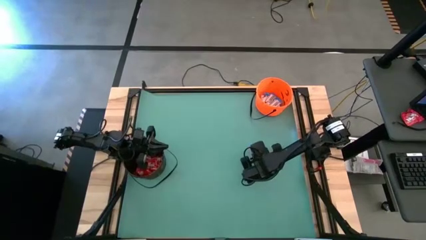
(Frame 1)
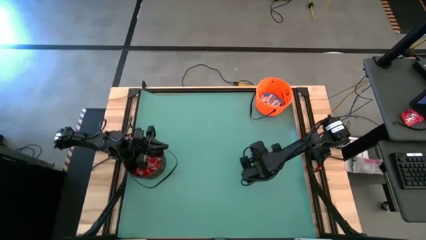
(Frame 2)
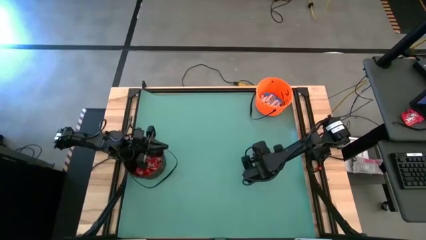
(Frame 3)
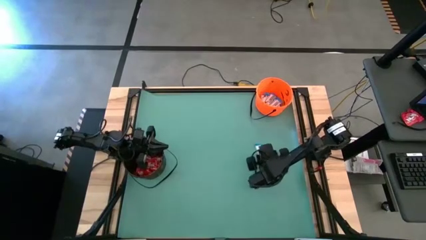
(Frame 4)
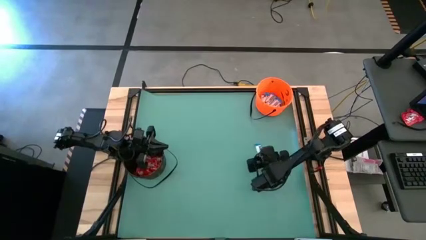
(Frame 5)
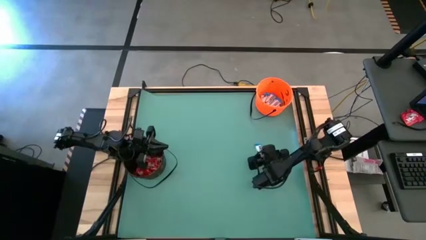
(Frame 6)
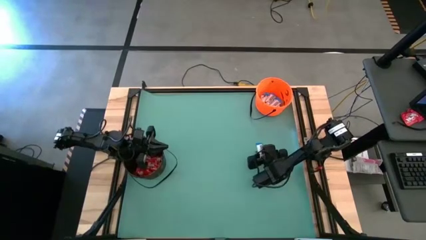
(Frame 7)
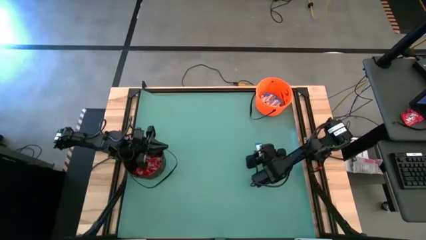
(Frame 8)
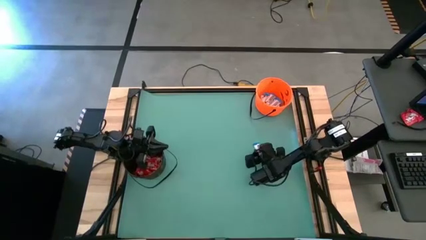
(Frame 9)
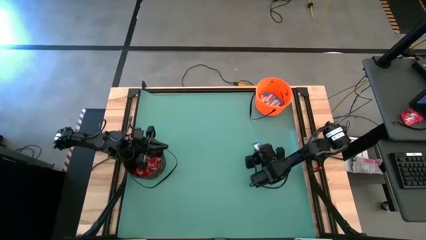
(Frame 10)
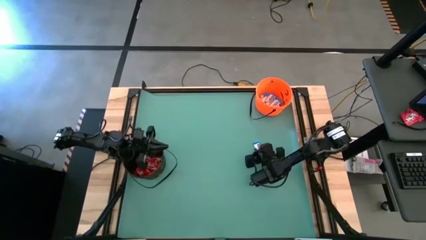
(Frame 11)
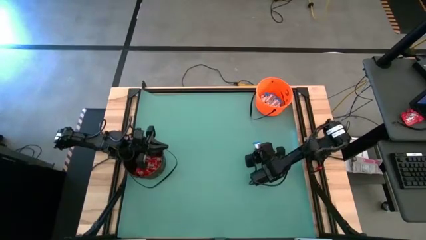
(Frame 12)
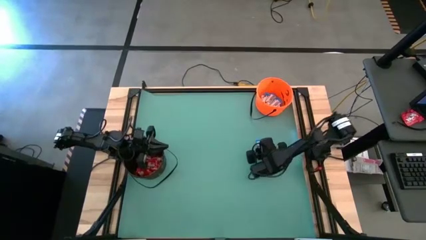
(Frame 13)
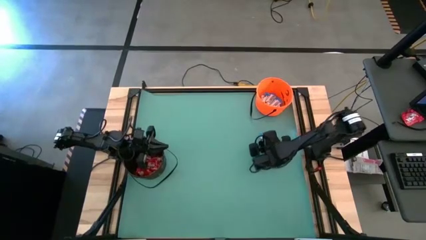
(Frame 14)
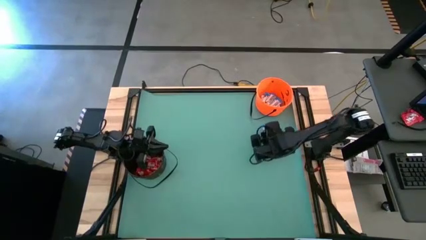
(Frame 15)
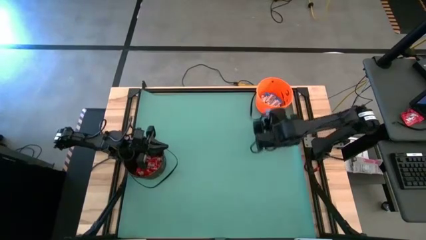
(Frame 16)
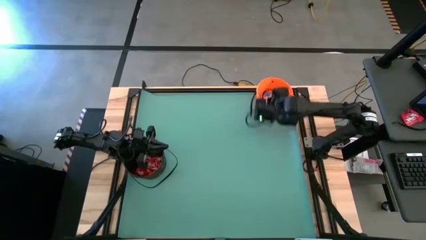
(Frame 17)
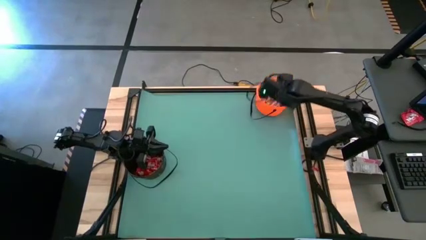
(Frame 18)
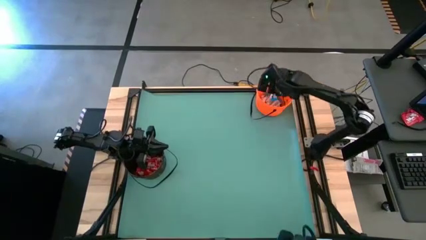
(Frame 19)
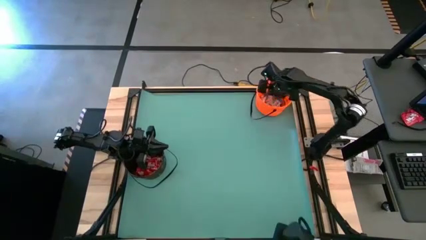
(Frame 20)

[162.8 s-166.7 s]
Task: Sort candy by brand, put in halloween buckets
Put the white chocolate into the orange bucket

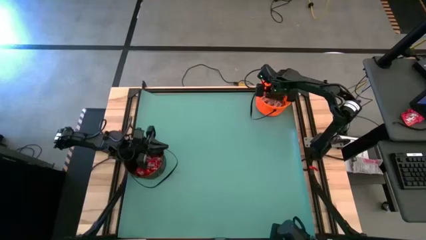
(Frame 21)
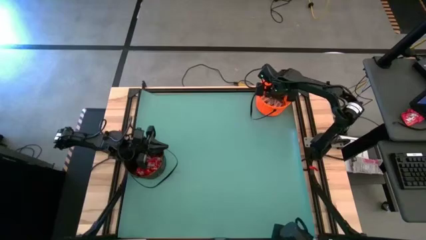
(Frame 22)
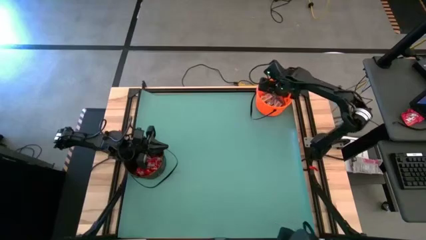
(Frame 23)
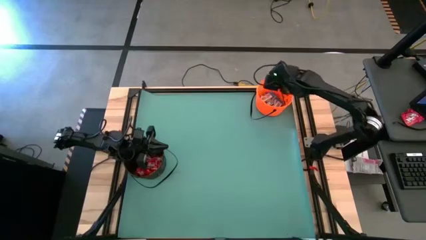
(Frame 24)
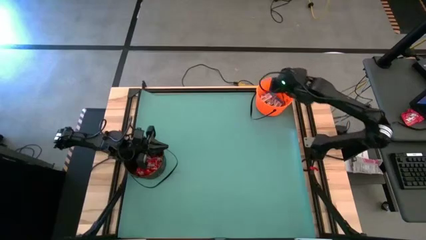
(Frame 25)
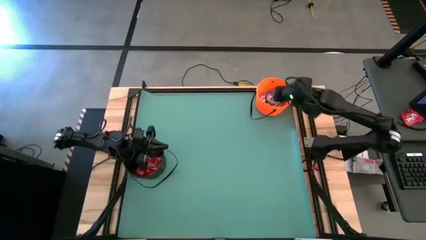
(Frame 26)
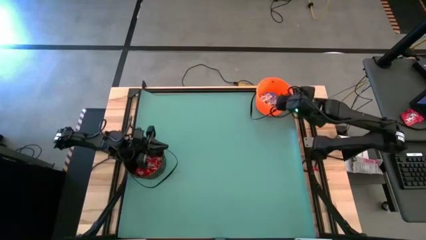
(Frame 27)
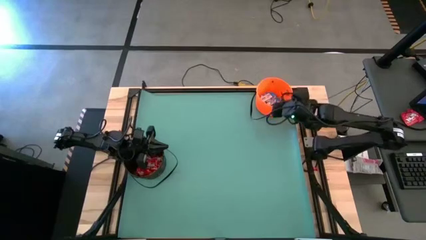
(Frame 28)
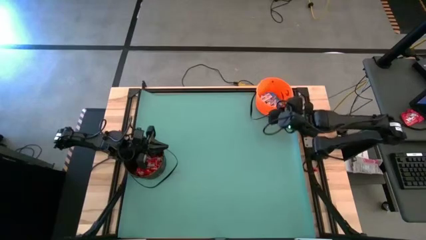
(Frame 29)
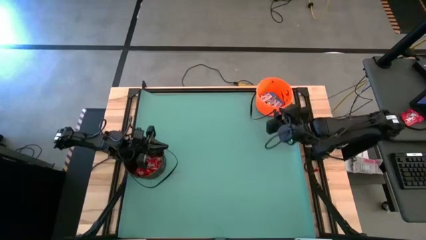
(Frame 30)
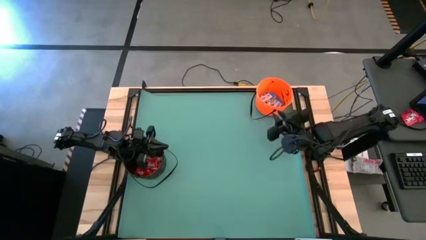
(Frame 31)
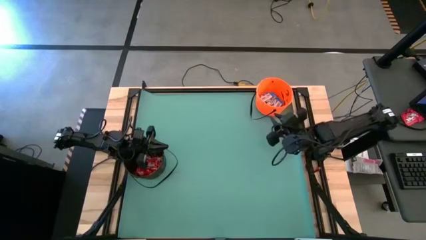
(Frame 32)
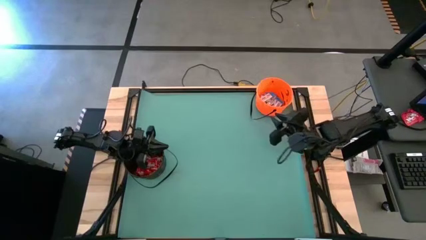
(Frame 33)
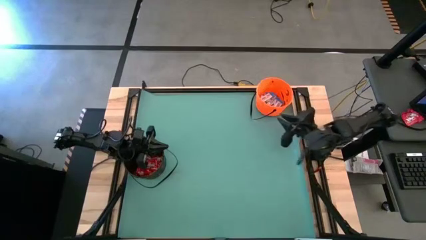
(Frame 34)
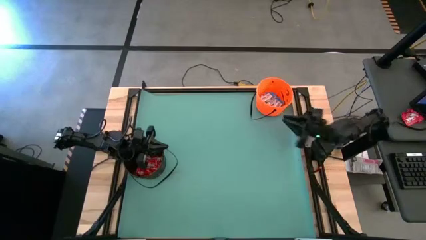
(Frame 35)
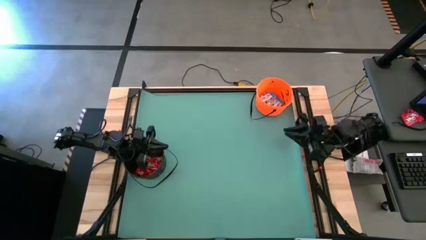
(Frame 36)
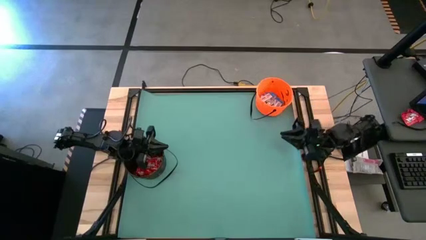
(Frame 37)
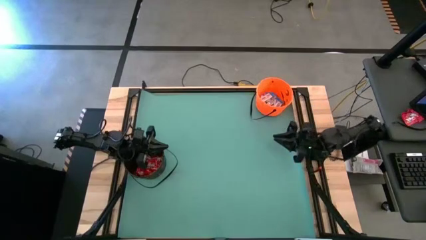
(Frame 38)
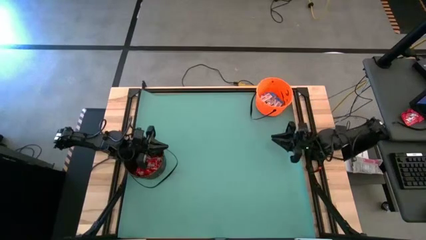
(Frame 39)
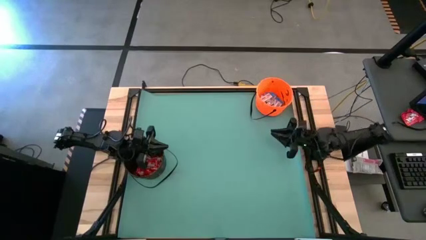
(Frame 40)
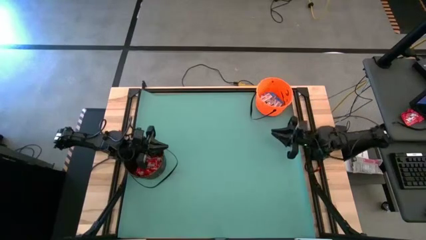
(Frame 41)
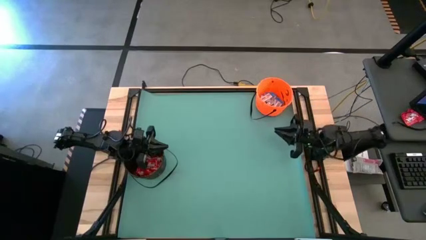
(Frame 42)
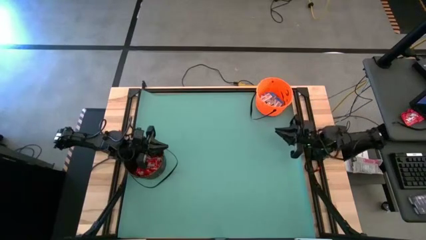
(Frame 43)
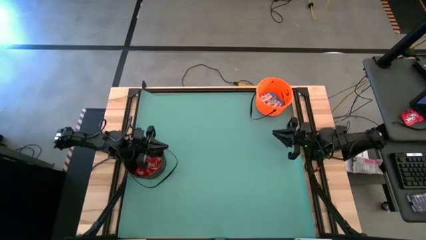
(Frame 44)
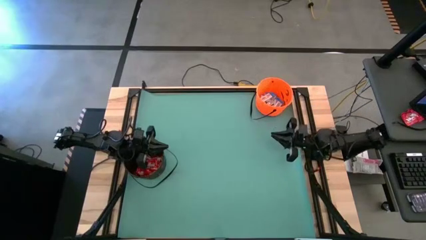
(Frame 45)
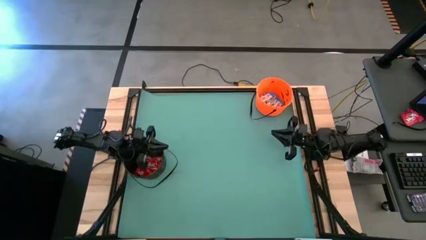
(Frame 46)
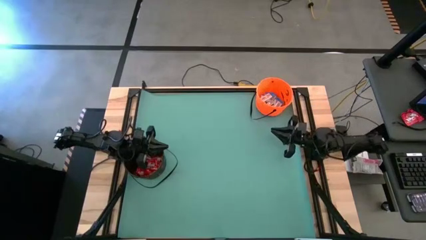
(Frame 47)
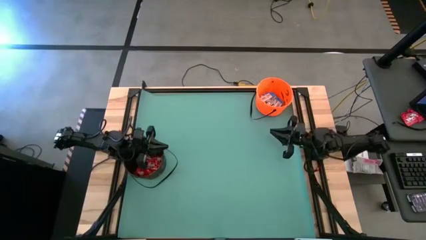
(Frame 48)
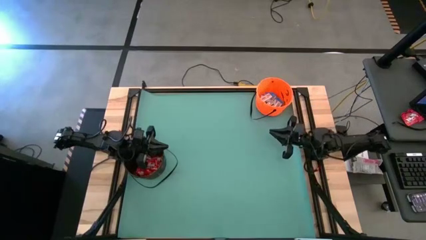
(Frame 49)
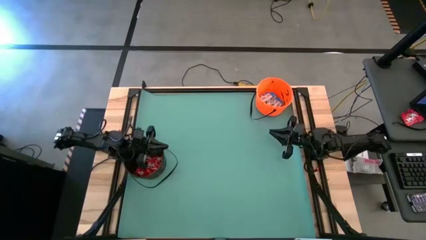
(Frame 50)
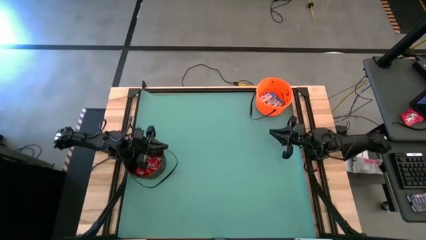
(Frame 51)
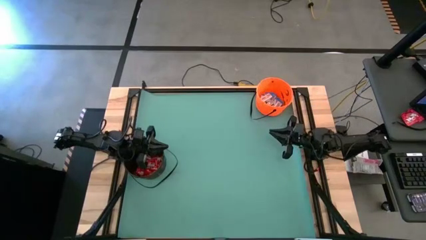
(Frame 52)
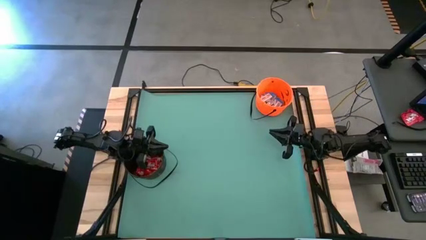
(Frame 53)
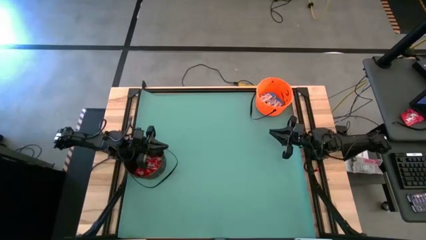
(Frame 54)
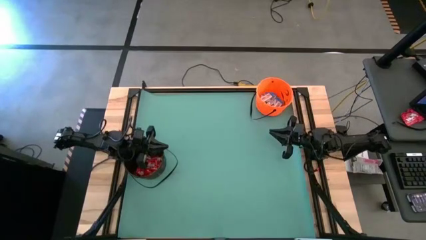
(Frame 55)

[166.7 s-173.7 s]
Return to Home Position

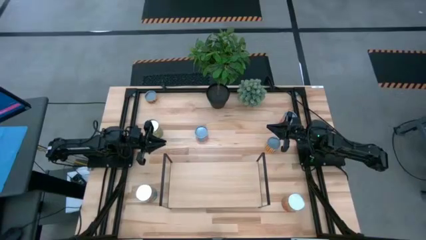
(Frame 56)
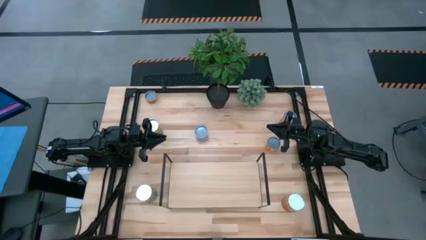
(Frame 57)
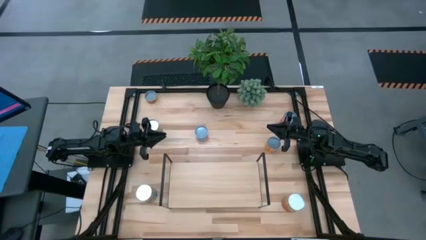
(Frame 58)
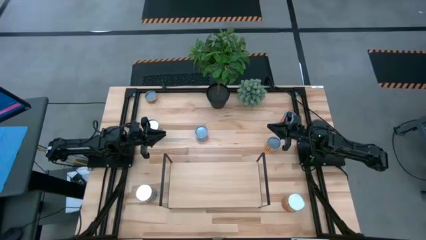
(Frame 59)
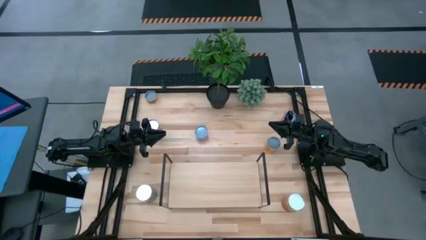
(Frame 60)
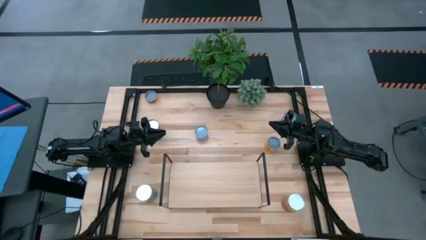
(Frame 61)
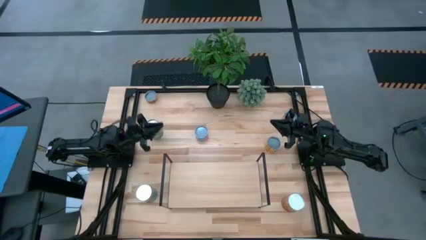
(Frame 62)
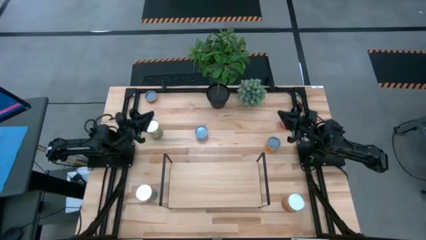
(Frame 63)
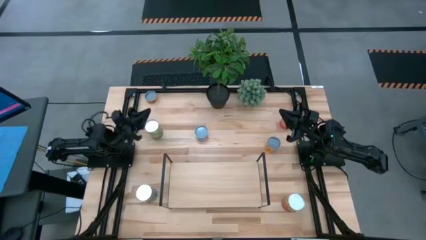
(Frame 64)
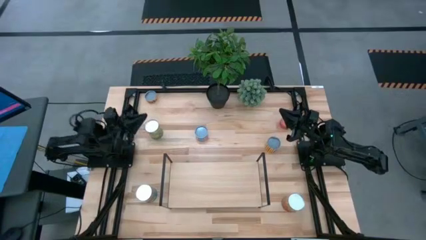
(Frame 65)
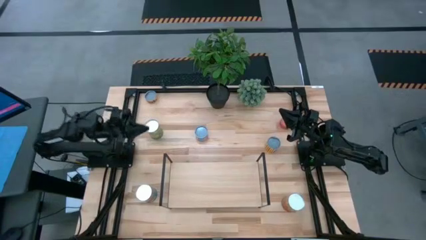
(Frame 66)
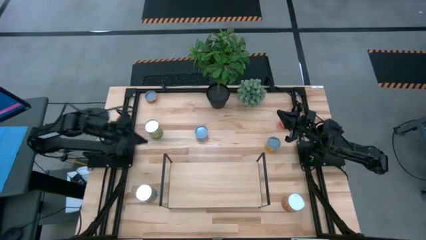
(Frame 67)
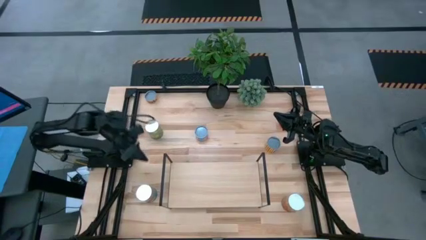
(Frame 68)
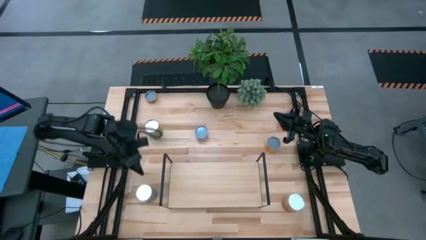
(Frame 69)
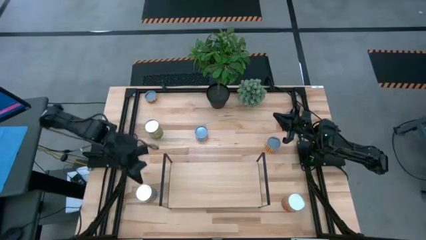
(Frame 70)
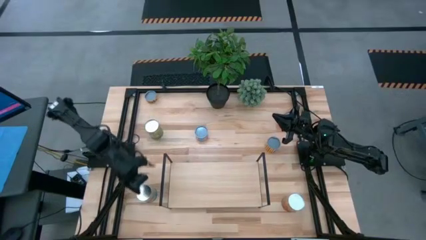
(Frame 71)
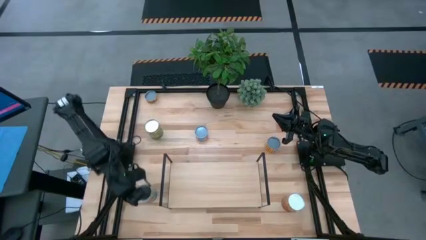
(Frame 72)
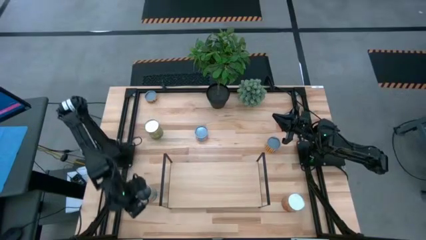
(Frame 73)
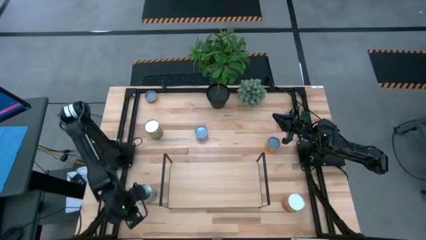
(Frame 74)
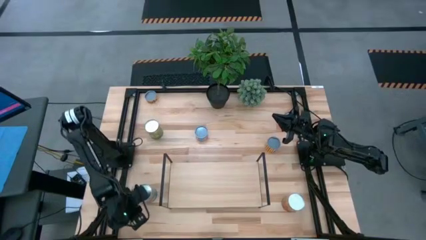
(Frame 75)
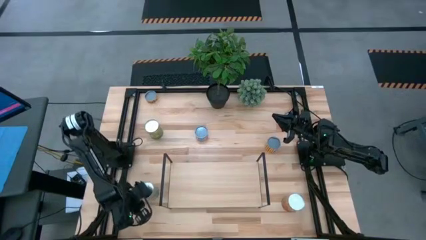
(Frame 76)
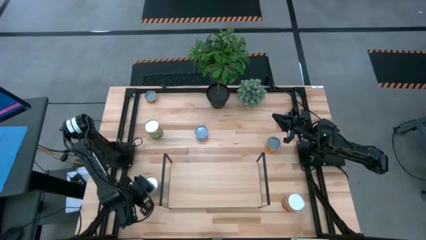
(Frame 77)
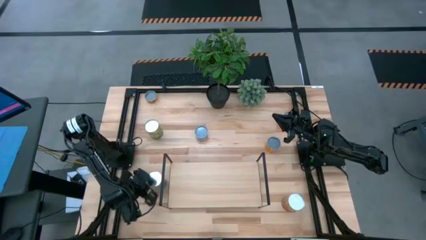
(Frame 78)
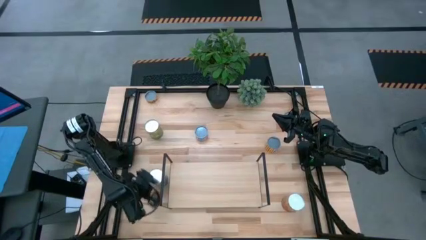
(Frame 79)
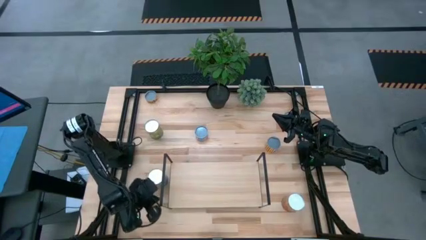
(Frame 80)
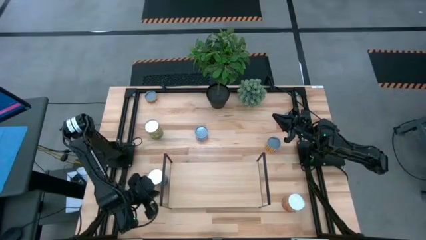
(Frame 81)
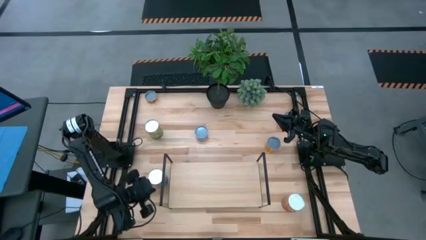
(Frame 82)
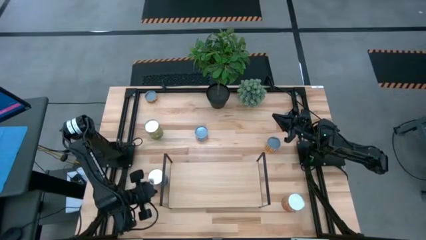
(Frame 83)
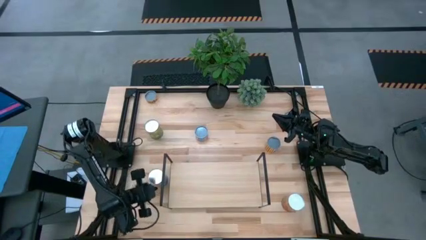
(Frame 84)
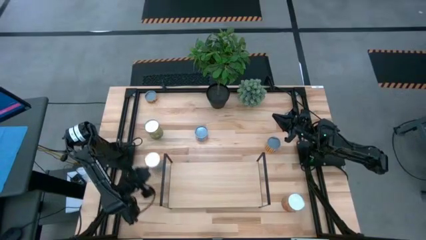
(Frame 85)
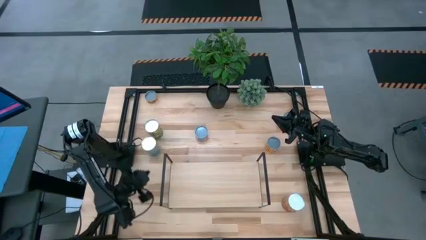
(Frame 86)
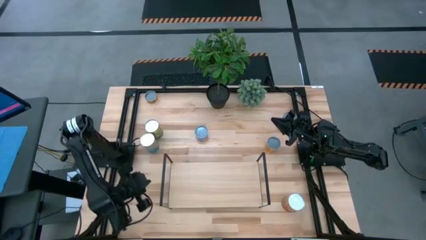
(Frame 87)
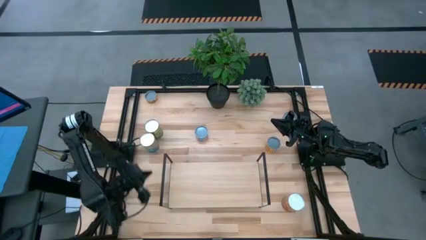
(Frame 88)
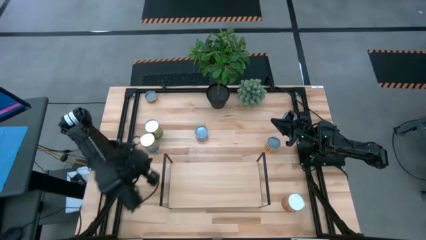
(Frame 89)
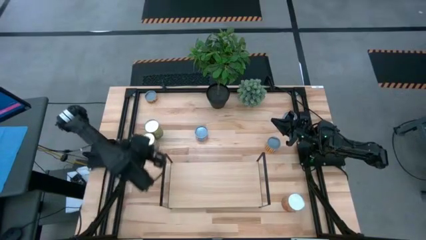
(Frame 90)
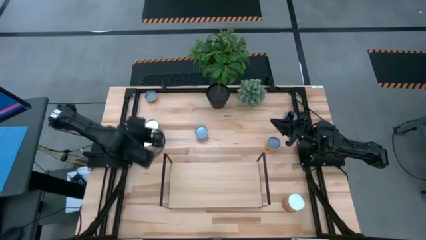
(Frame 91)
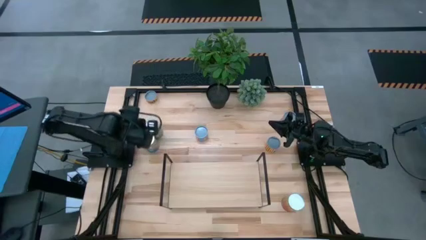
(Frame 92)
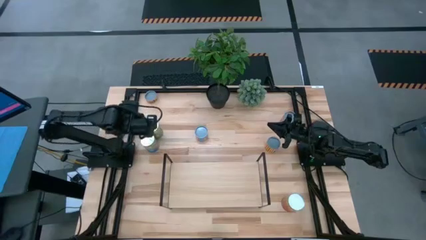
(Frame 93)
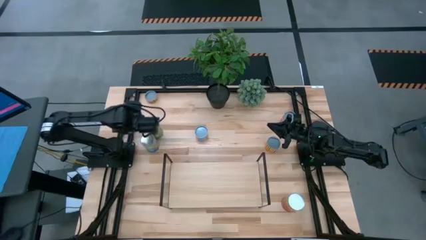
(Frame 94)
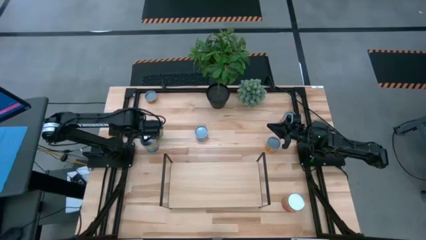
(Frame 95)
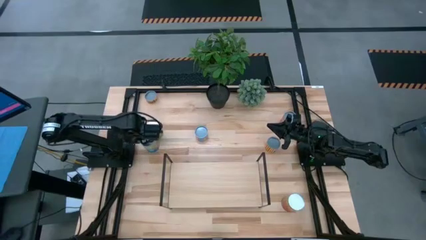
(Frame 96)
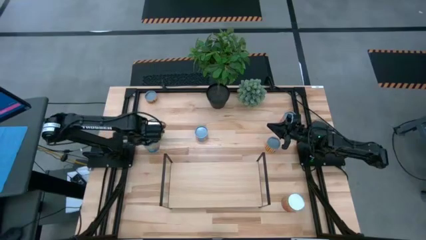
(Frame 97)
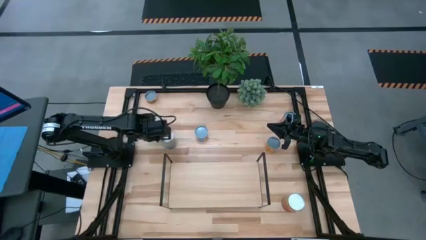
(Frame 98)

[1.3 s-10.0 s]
Task: Pick and place cans onto a shelf
Move the blue tomato can to the top left of the table
